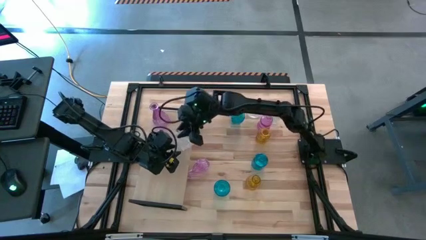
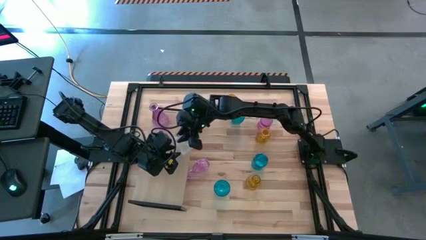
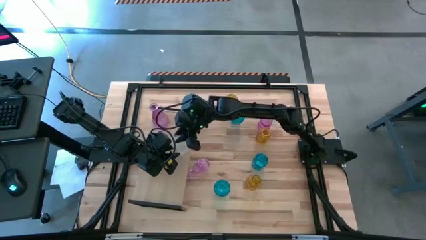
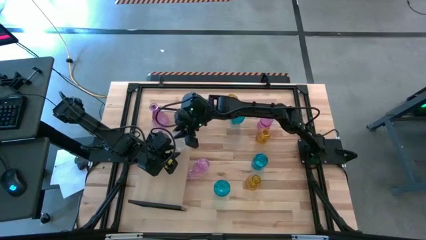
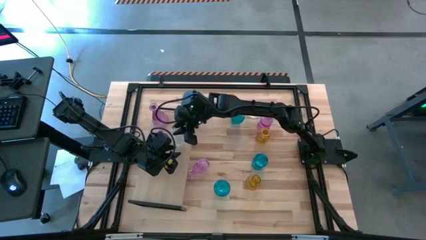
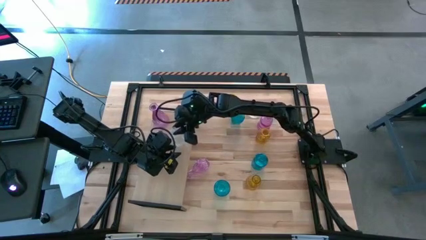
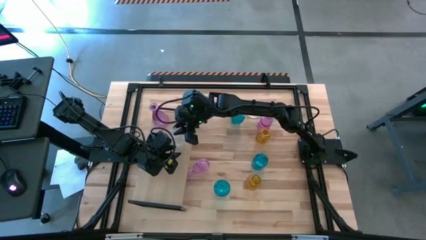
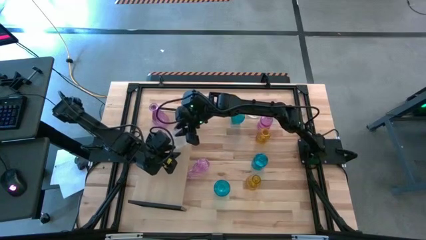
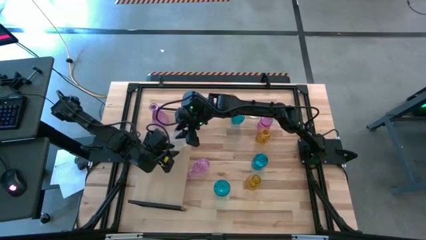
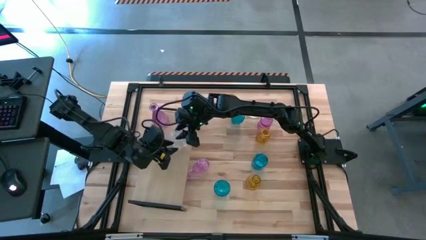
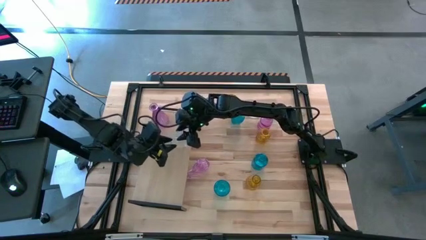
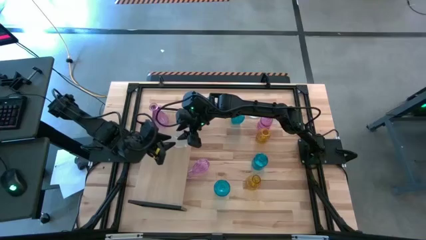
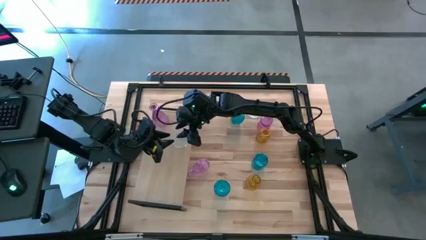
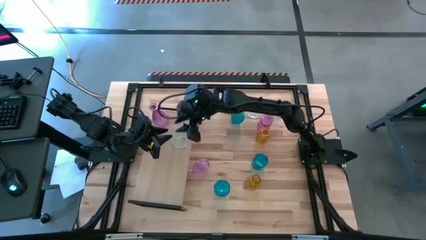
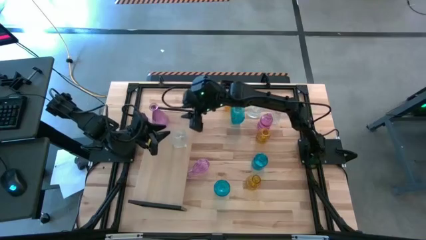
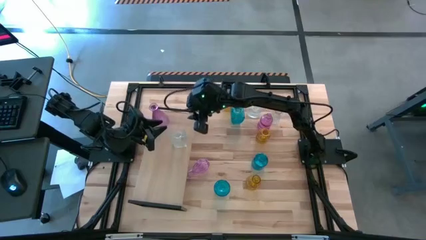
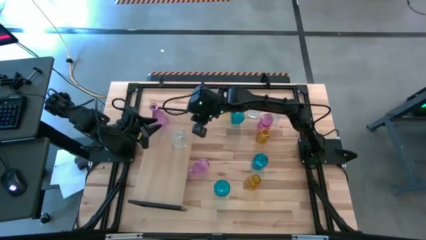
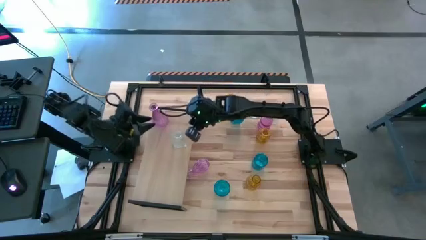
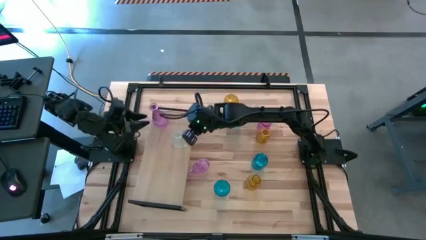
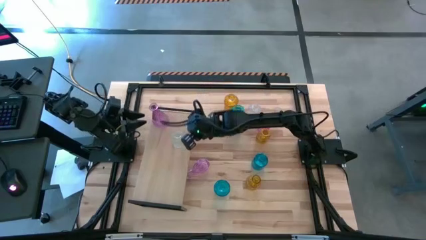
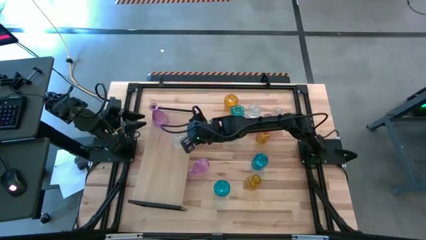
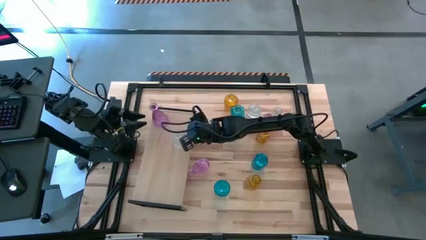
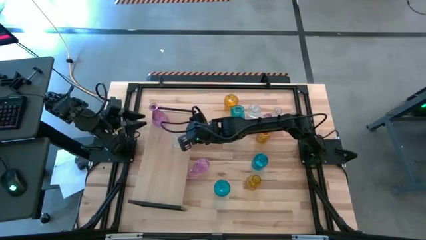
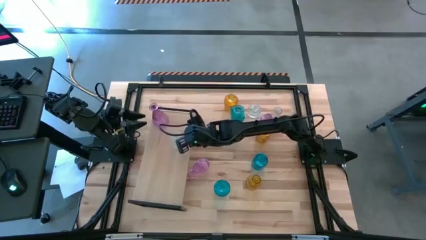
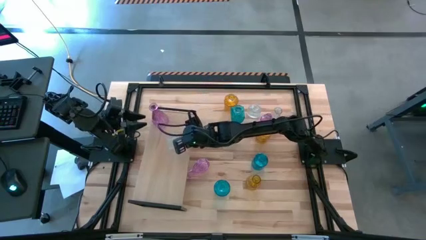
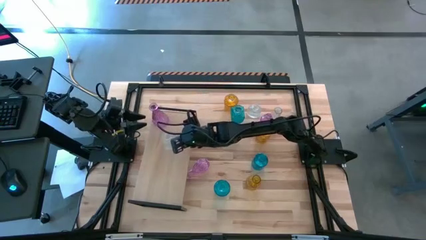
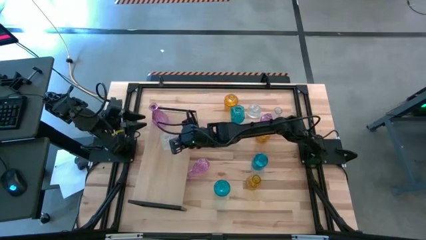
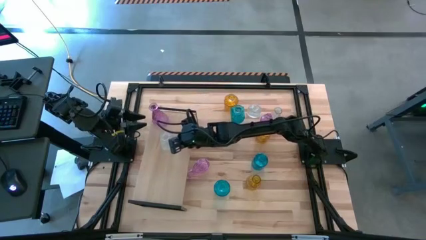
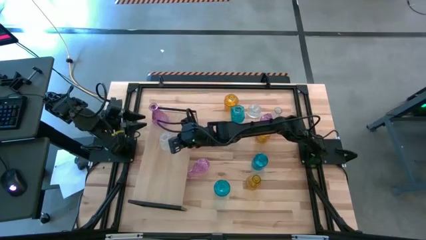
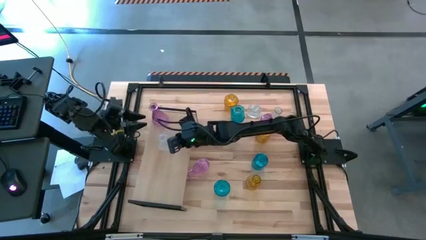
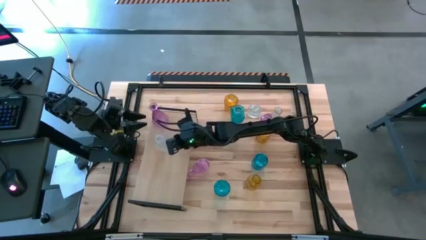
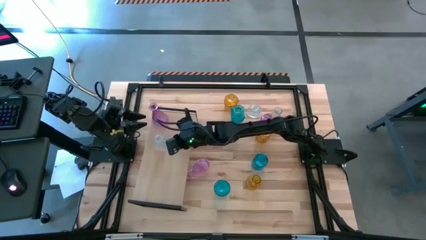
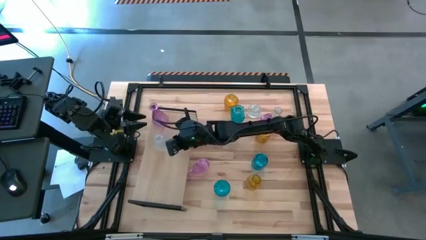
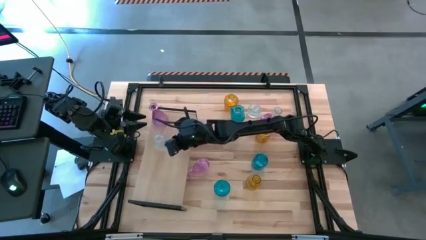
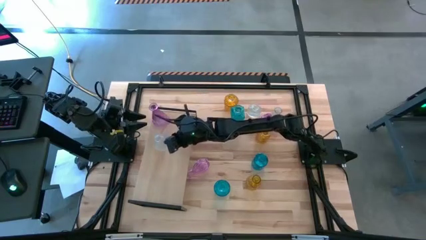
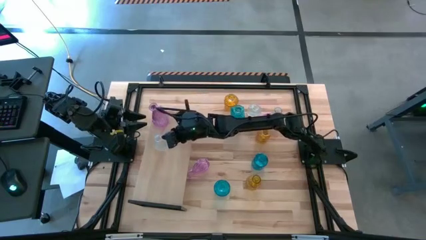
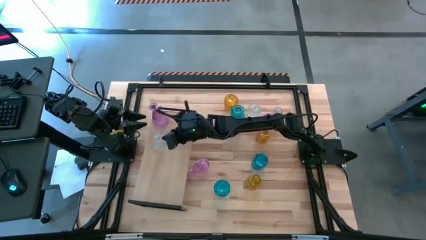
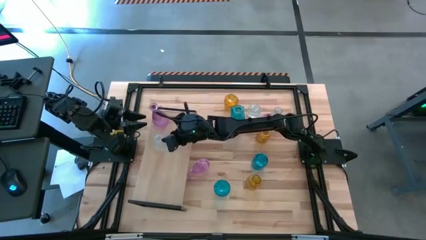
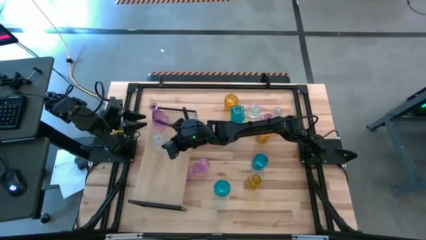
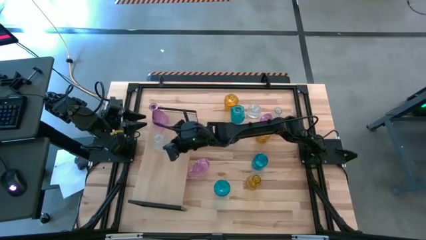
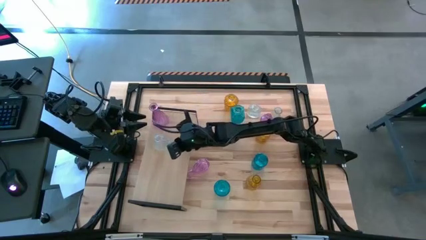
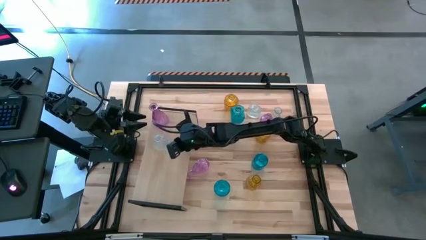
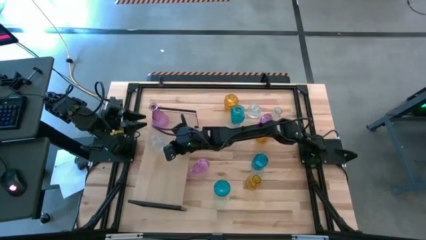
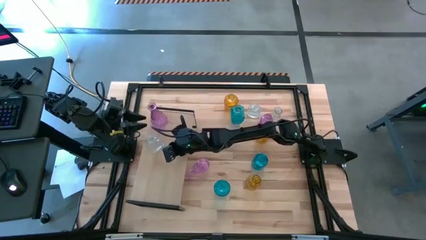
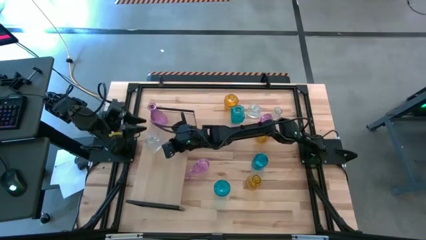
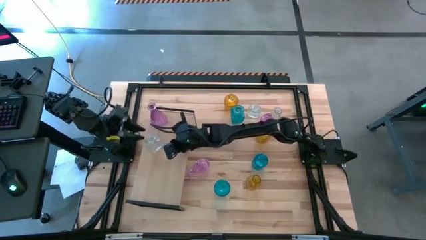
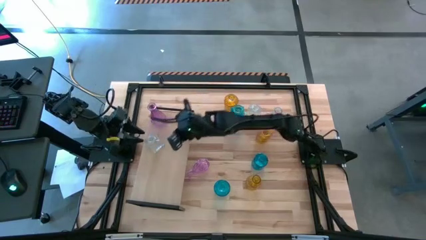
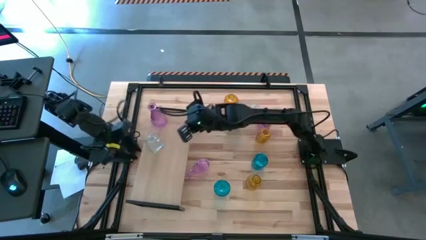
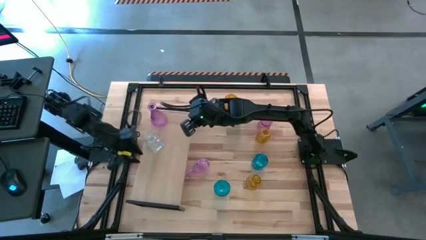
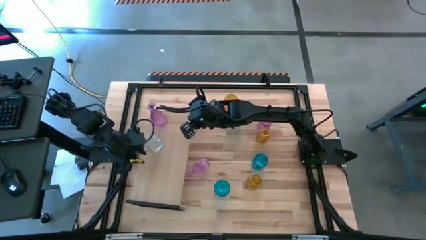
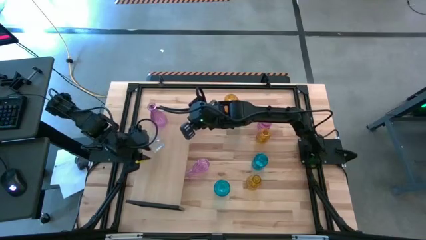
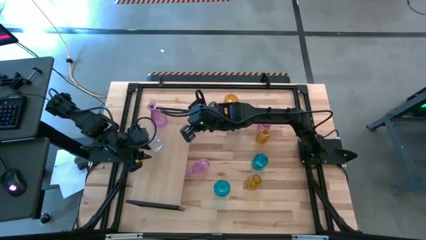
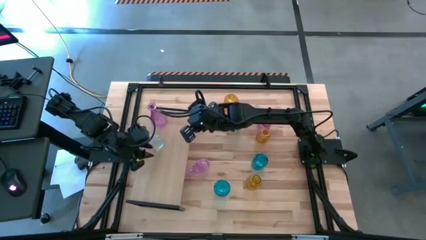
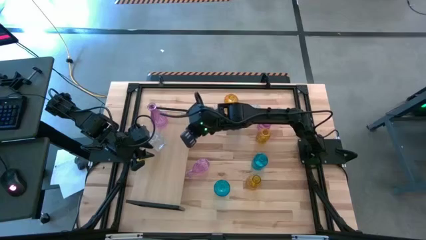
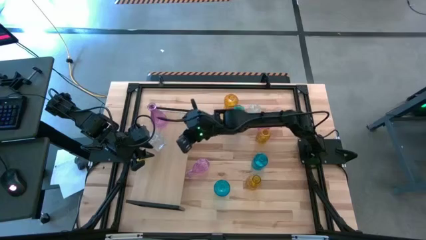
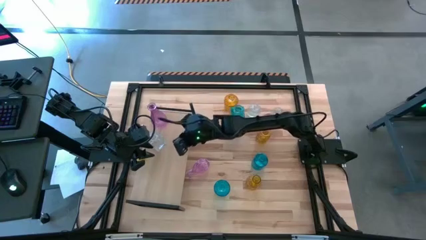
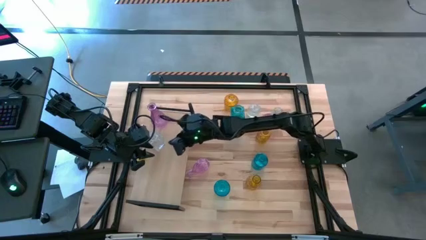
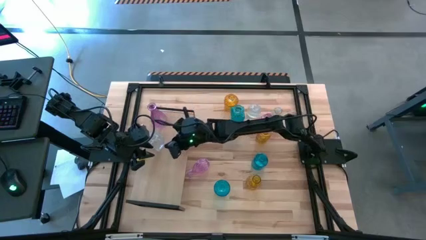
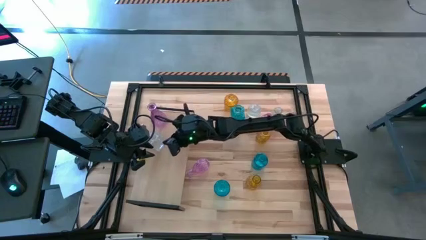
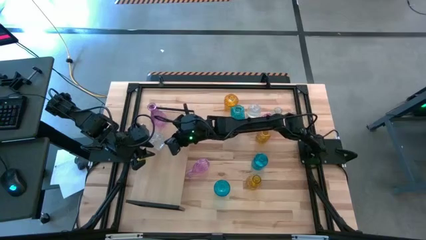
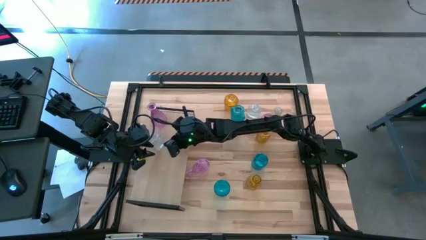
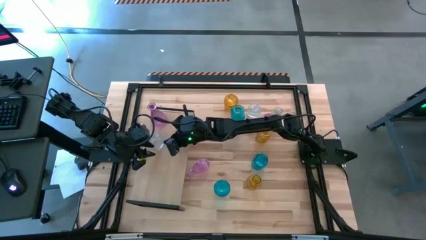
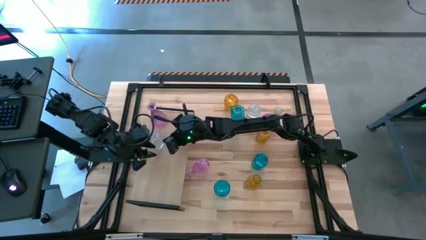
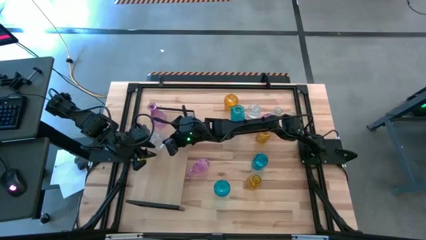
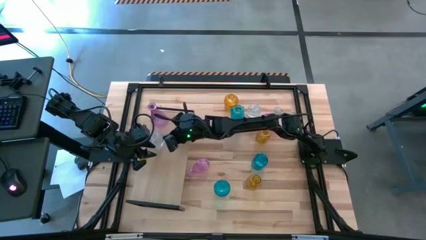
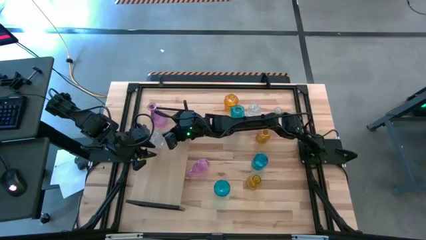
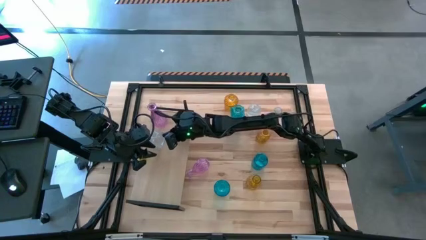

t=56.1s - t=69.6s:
Task: sort vases onto shelf
Put the bottom left transparent flower vase on the shelf

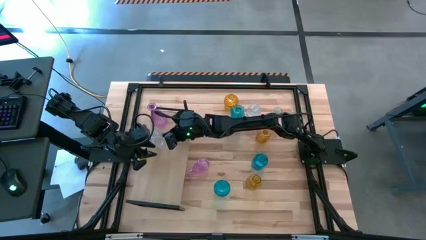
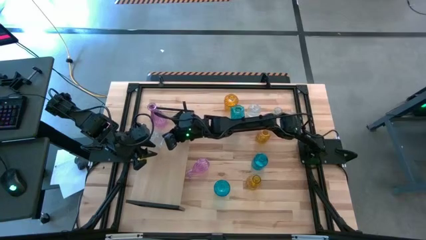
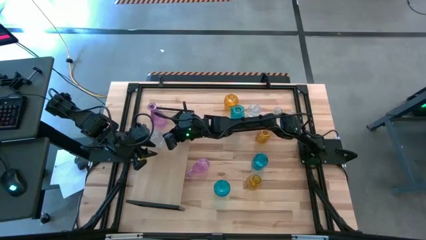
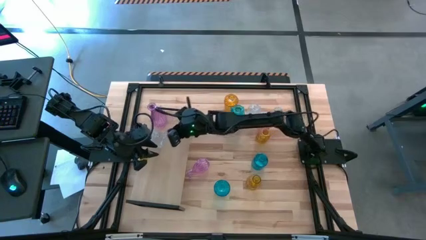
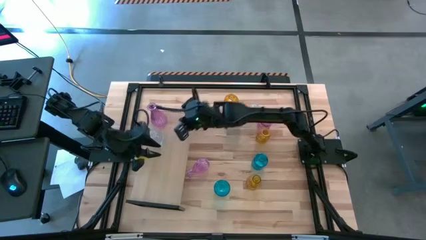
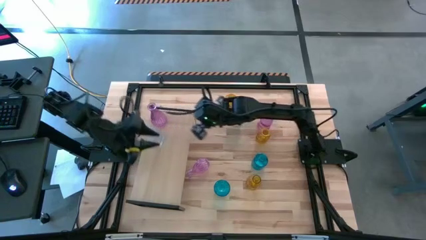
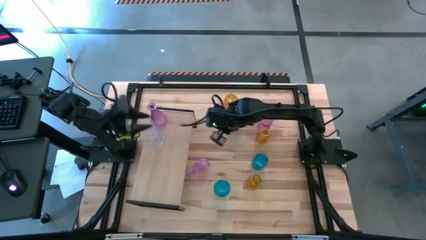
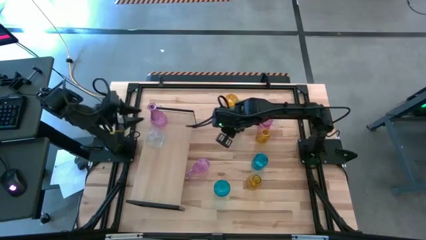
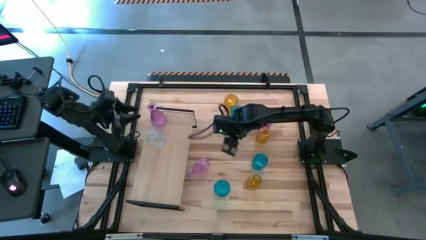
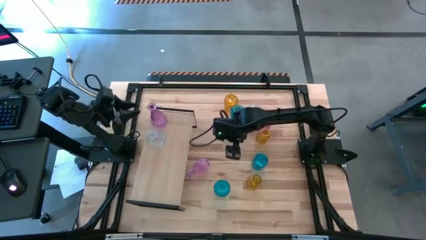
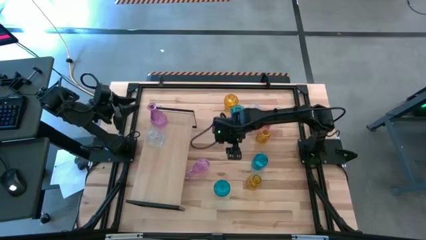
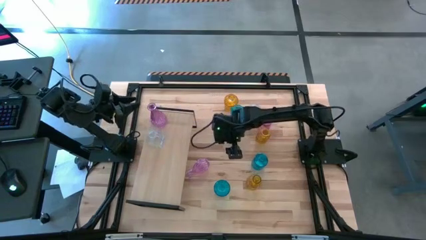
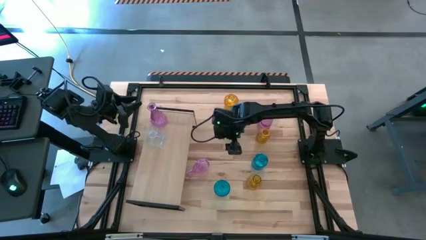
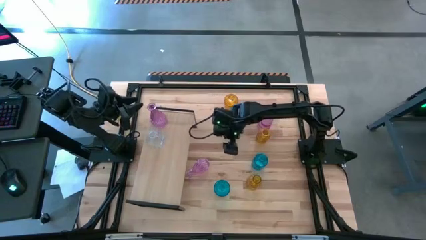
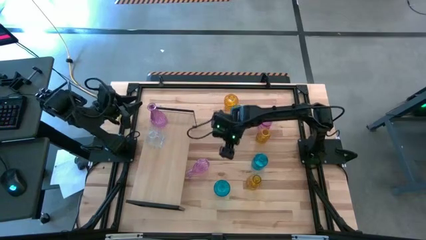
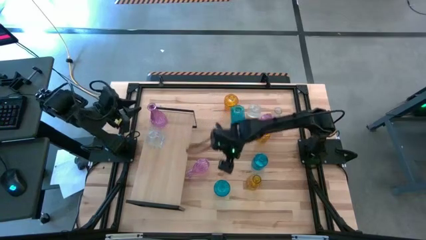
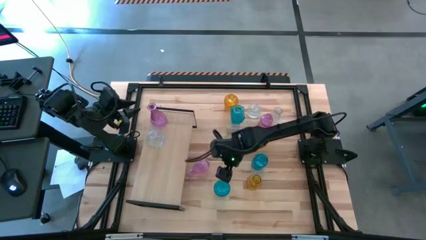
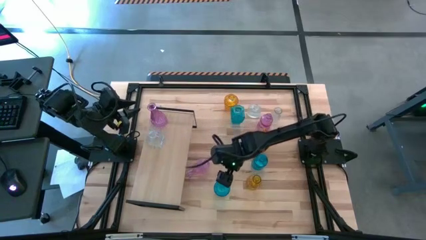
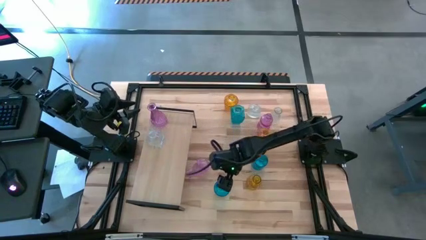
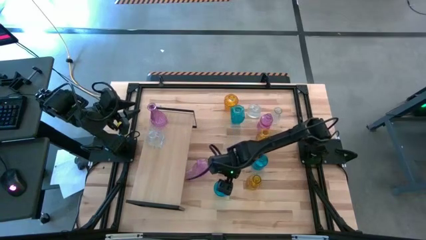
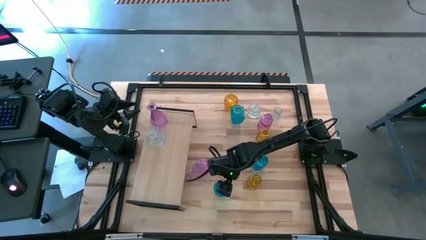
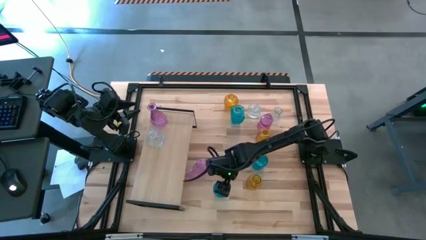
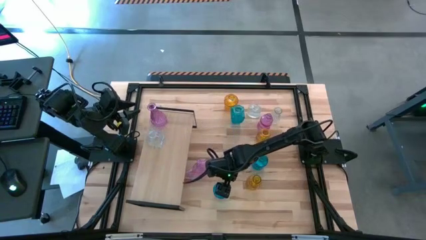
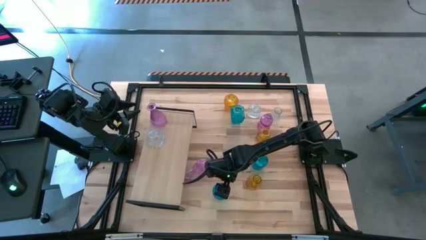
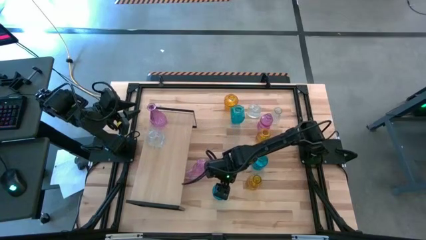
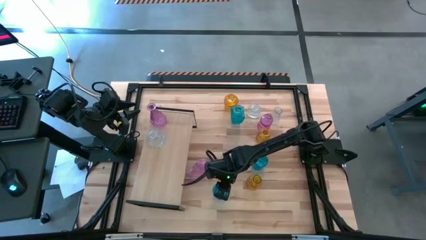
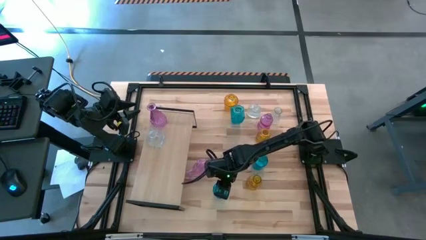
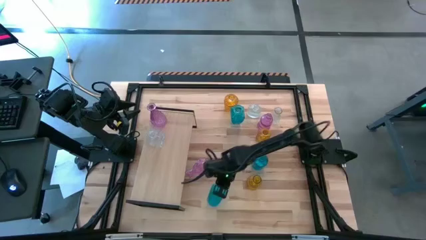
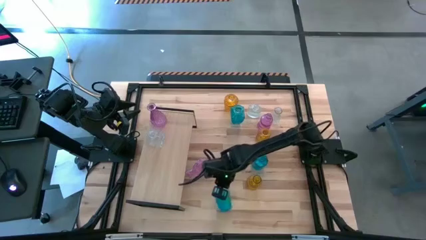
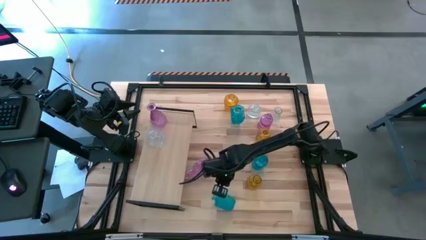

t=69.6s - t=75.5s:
Put the bottom left blue flower vase on the shelf
